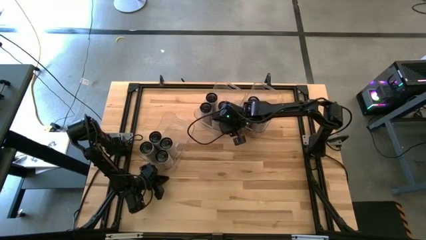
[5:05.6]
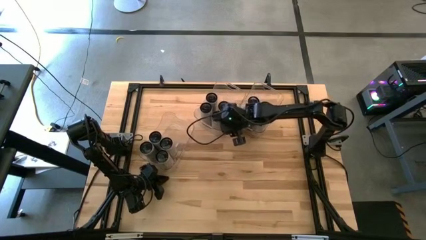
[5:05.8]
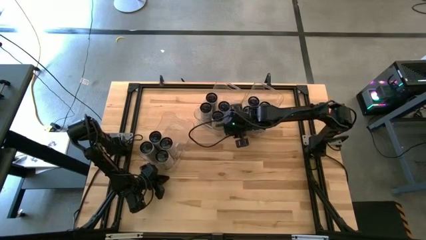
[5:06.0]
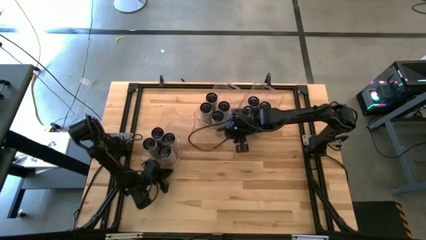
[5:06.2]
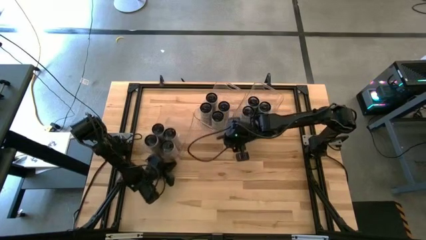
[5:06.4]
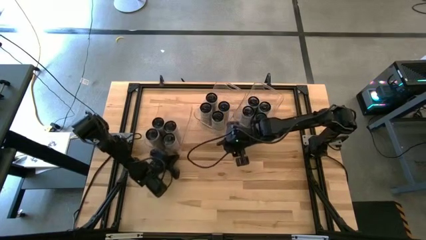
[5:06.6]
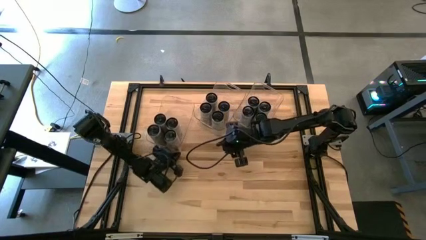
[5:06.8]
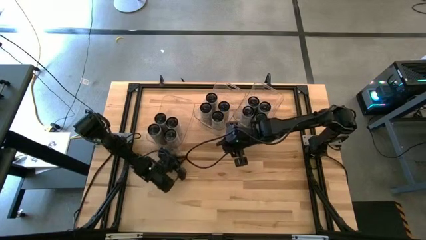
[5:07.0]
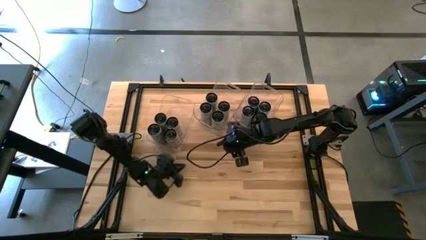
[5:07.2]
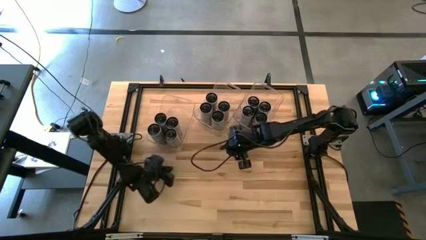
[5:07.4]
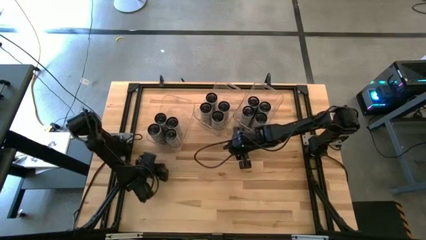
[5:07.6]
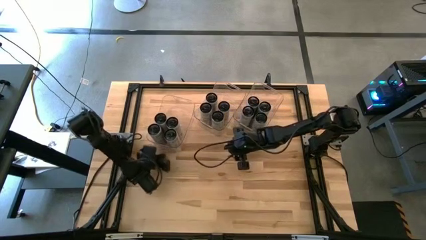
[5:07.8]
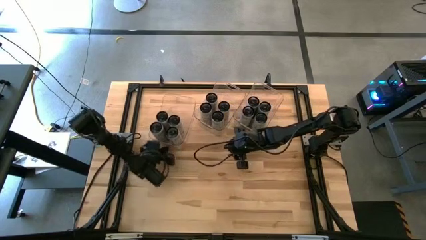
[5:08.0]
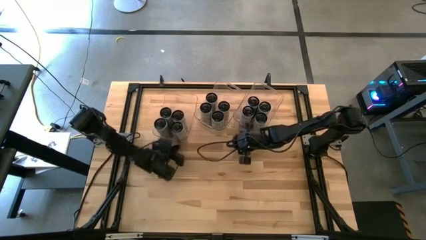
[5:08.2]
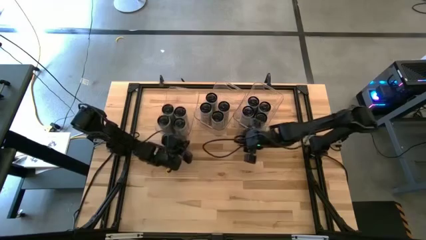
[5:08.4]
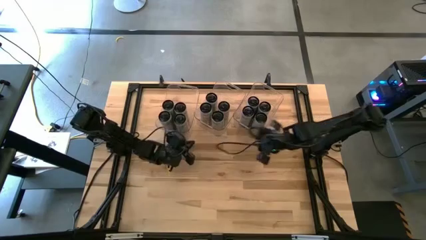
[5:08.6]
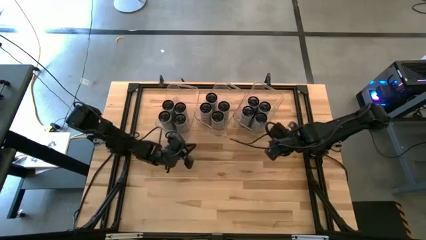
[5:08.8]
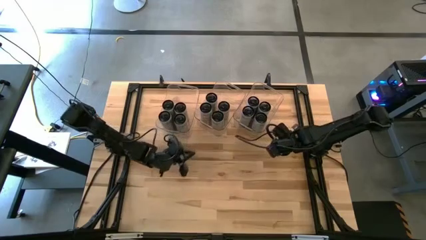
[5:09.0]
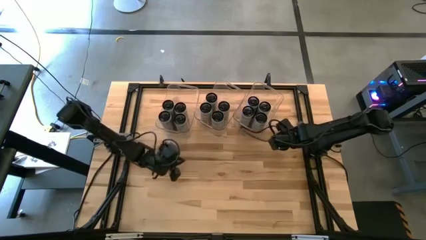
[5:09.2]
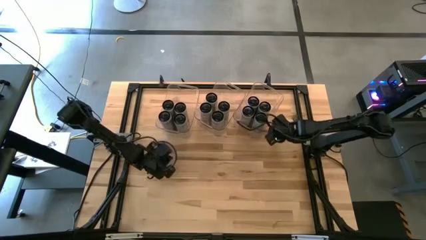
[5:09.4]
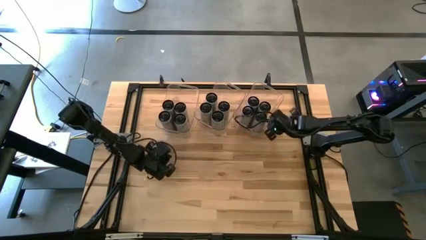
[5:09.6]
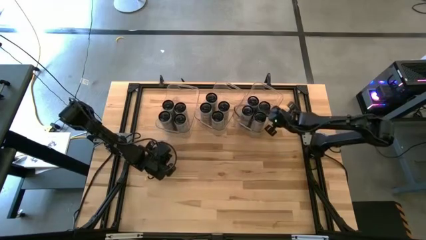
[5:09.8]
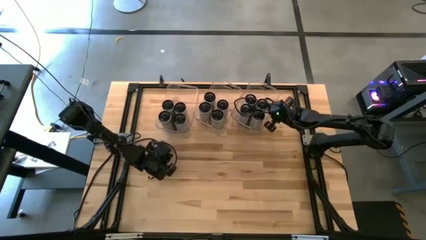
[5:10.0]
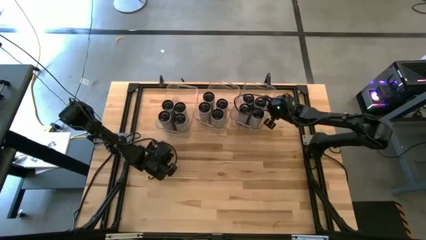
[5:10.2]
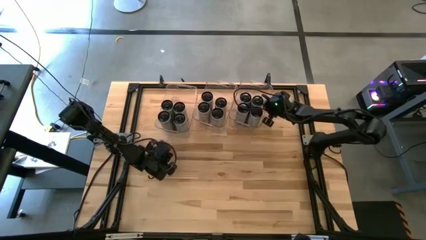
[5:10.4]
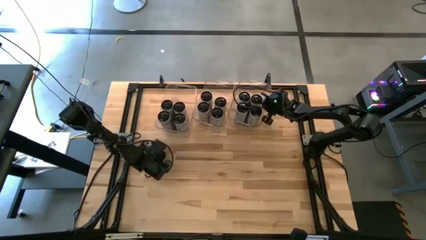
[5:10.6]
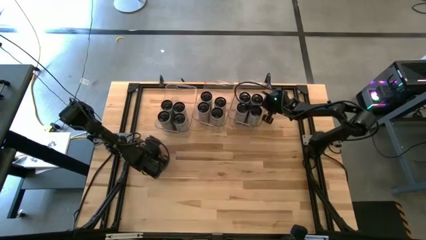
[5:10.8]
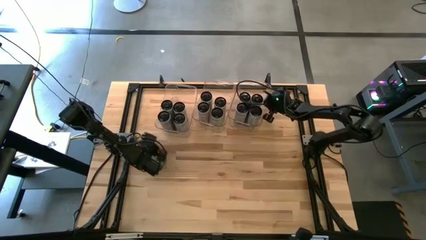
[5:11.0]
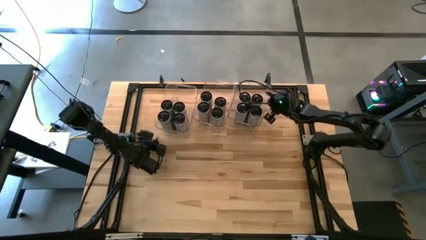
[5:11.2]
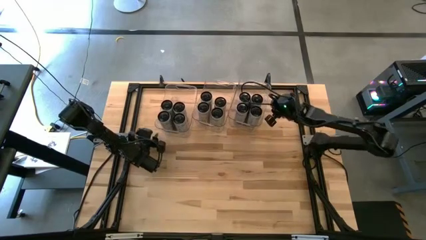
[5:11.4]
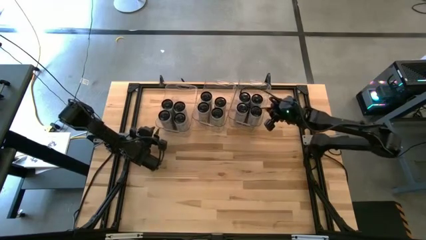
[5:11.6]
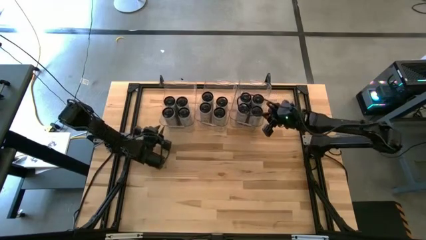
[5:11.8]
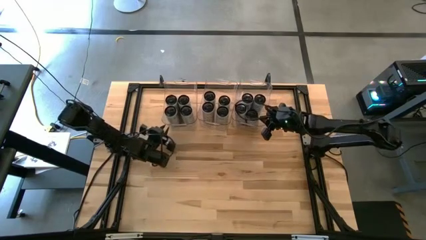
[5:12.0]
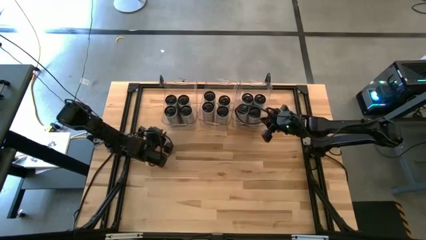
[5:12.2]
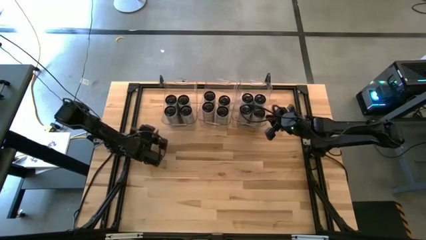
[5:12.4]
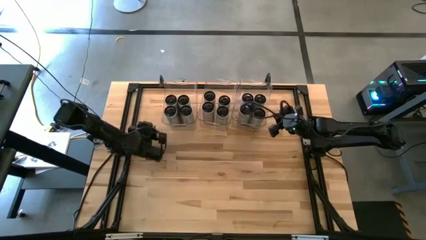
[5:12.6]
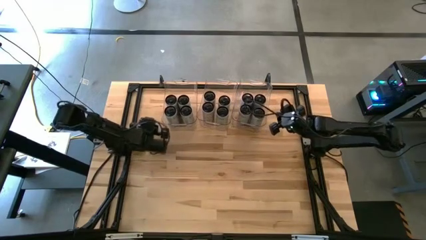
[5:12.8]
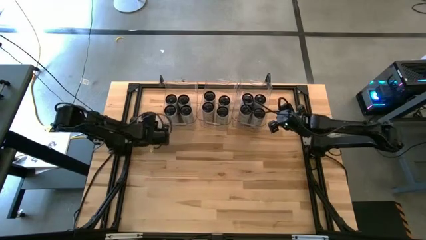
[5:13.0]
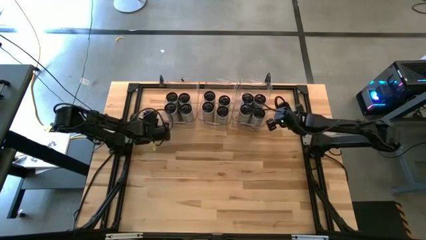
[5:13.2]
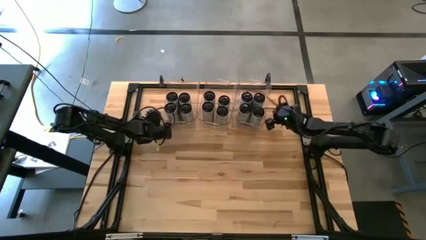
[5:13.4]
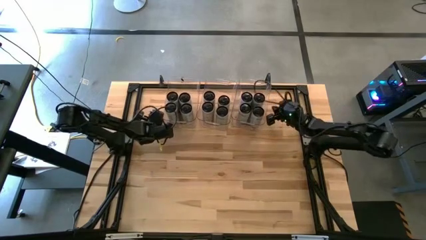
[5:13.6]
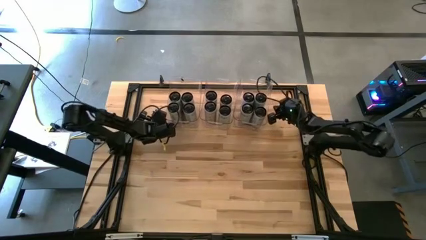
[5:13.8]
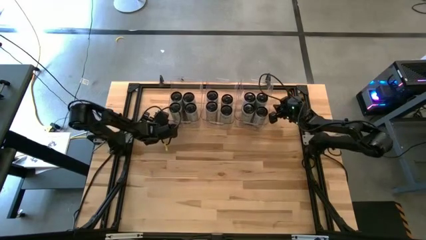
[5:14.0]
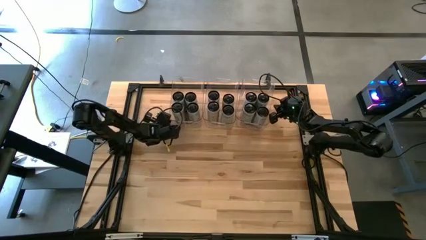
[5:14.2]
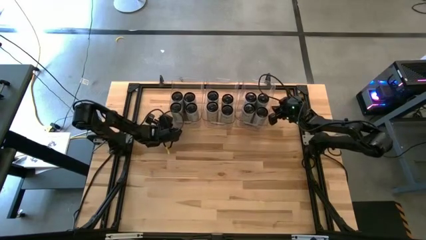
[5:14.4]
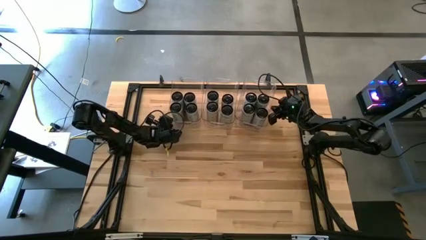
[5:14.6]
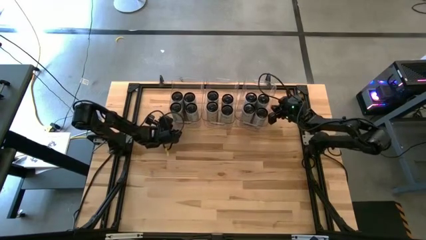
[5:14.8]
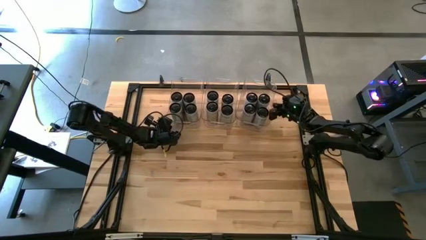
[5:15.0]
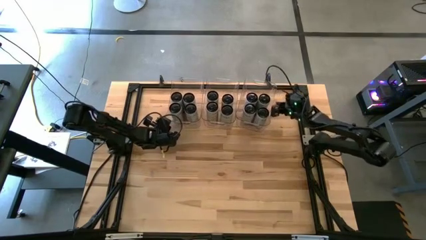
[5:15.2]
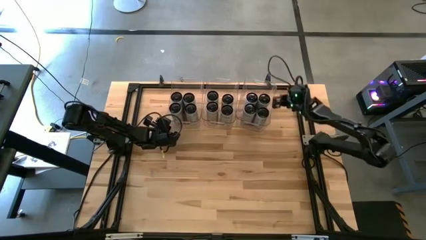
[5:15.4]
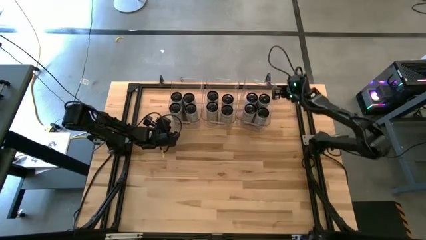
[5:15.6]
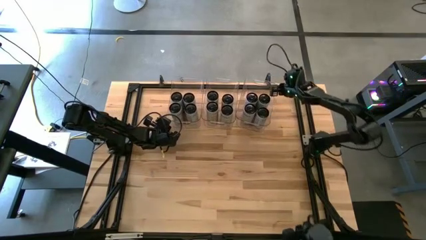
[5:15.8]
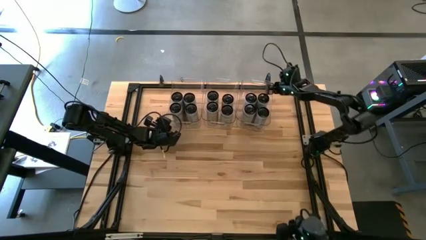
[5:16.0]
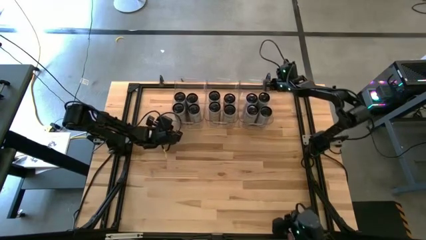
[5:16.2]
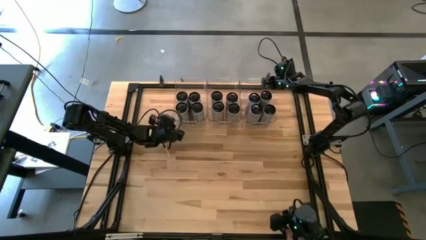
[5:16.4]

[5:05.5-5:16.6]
Task: Sort soda cans
Move the bottom transparent bin to the top left of the table

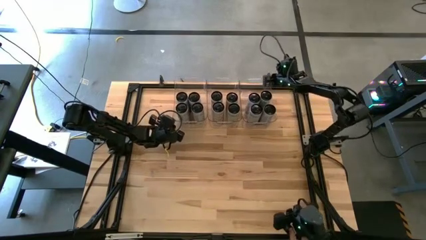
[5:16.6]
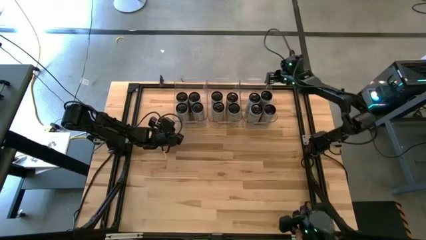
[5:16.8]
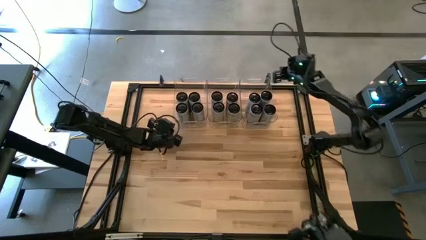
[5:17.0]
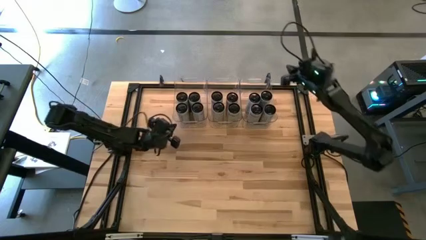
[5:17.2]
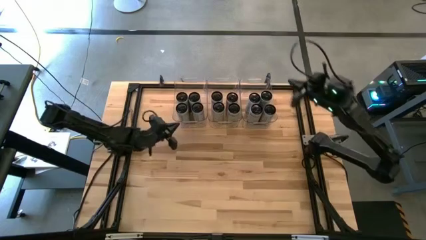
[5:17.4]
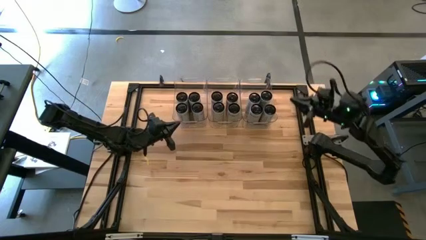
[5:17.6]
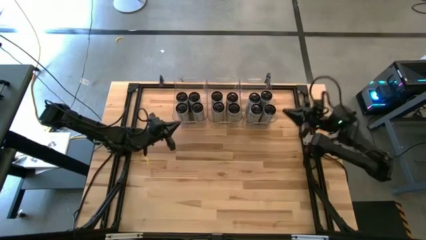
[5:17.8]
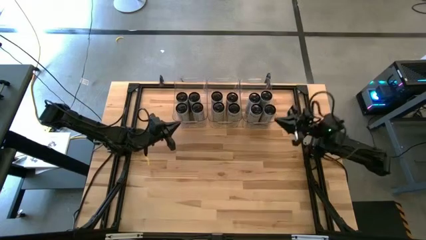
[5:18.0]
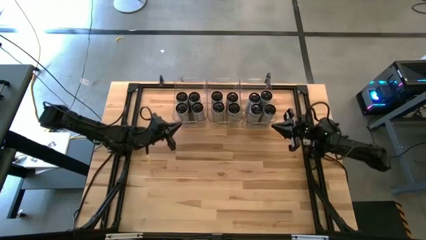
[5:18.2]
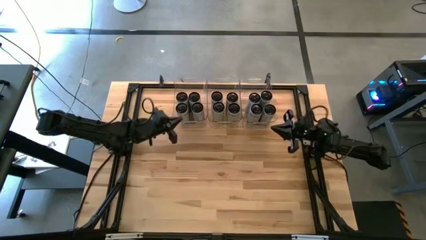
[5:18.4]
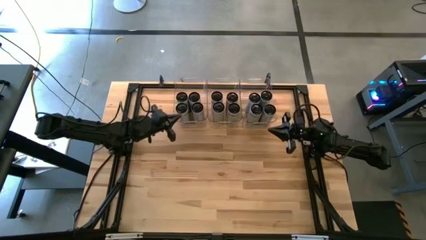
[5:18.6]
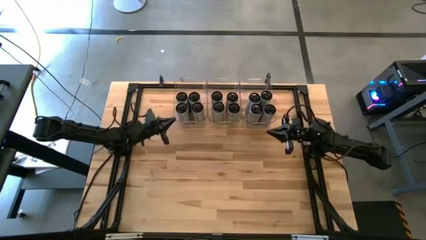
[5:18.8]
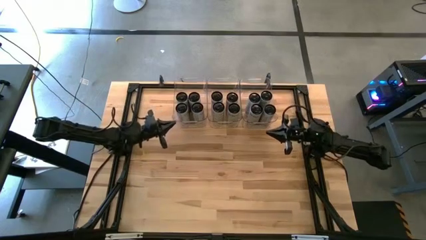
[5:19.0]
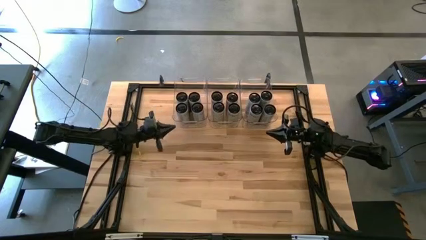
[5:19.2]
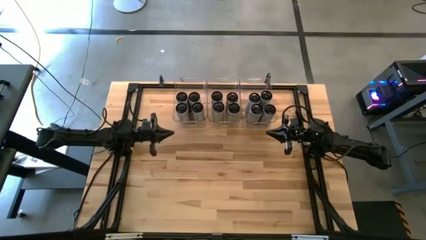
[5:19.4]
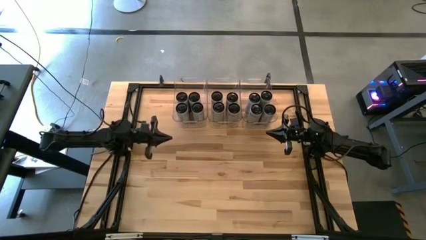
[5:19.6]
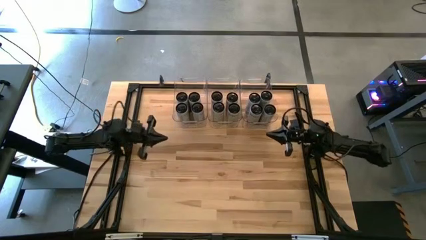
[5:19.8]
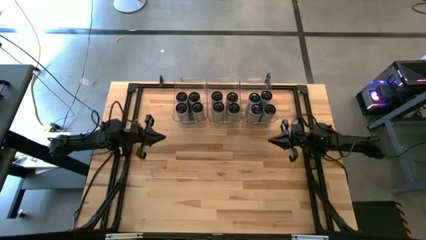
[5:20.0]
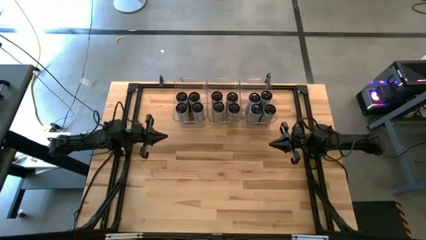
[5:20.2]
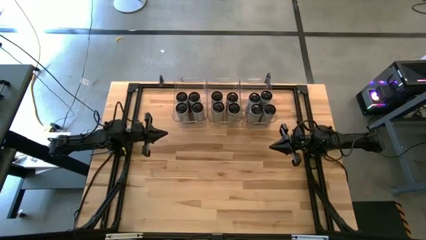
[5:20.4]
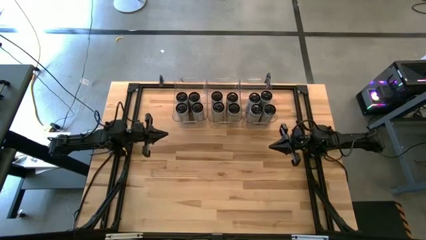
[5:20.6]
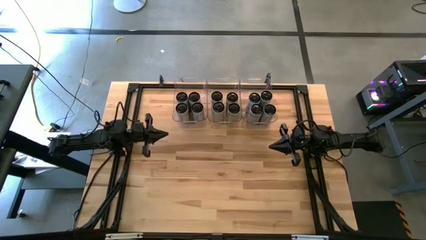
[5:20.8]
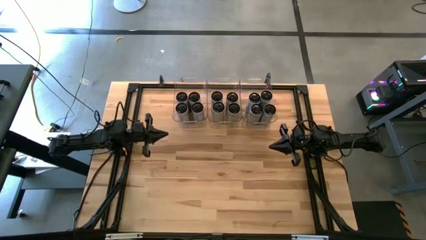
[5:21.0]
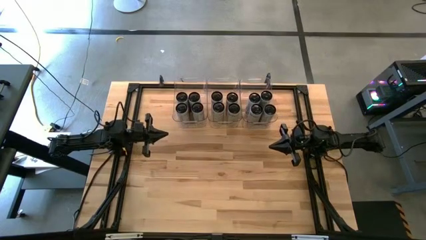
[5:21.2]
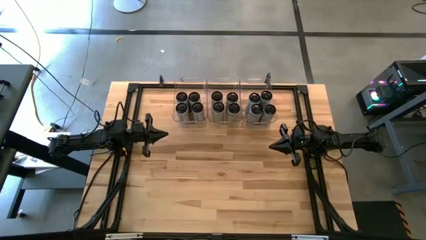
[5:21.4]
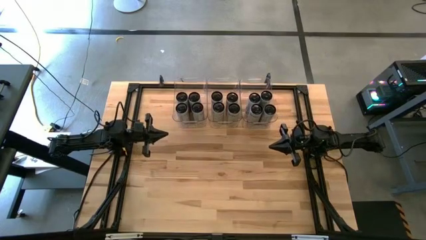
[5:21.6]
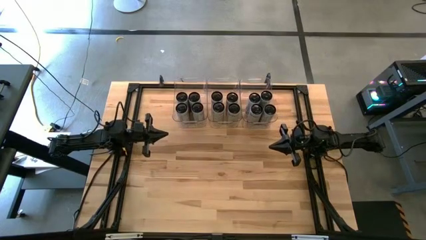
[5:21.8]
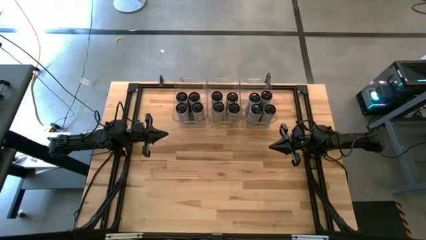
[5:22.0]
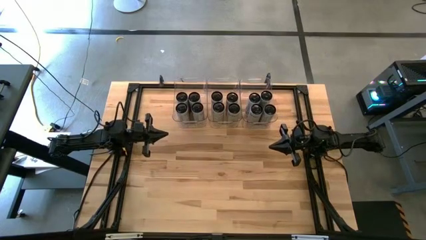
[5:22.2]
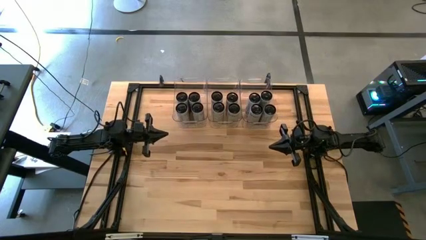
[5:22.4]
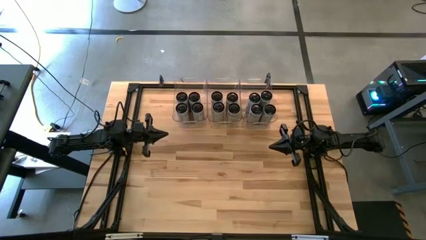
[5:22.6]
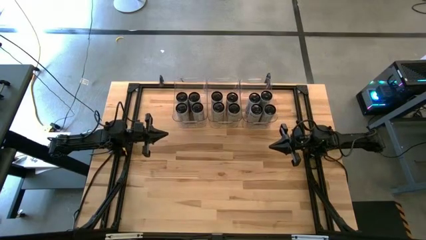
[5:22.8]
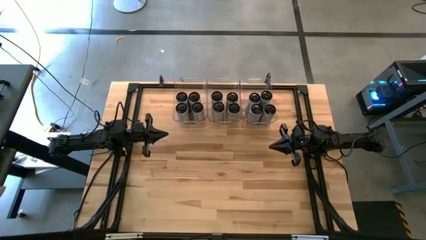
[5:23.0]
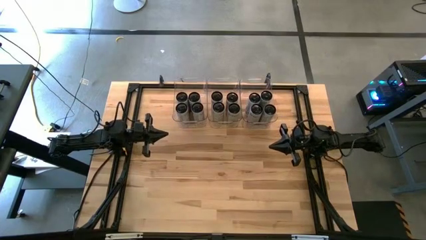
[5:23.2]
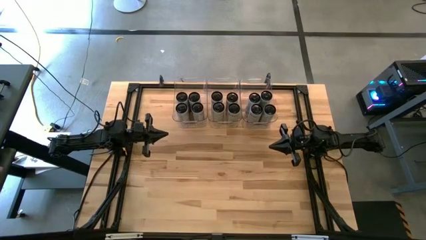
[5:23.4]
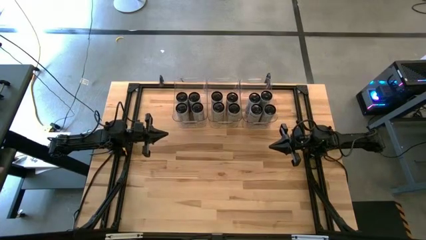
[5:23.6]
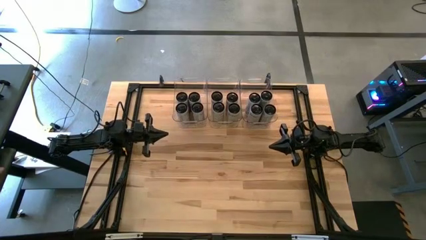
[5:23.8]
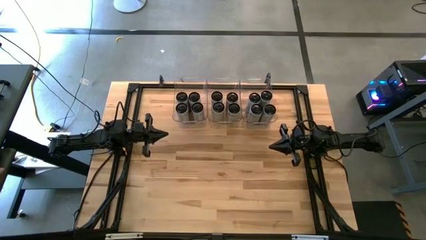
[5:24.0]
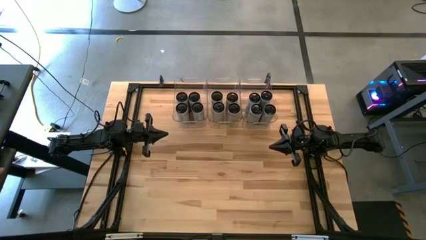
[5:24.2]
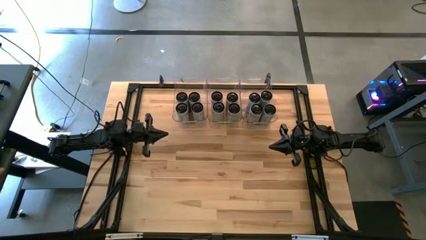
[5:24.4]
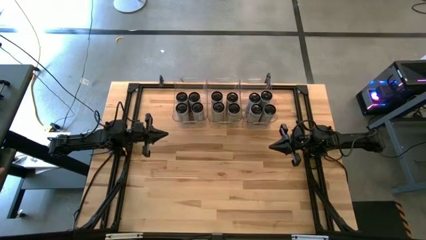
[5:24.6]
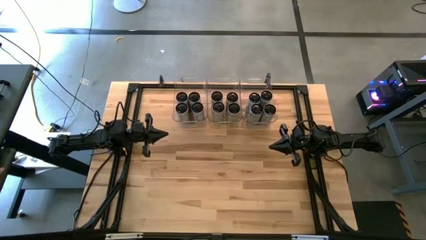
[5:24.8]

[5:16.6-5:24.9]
Return to Home Position
